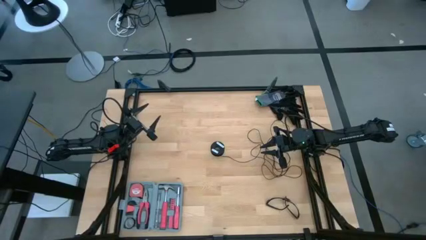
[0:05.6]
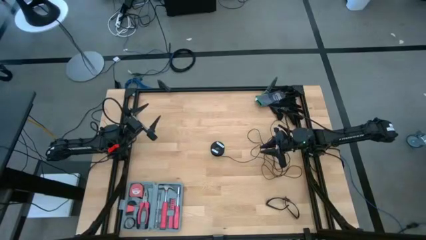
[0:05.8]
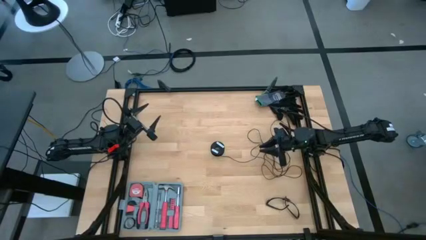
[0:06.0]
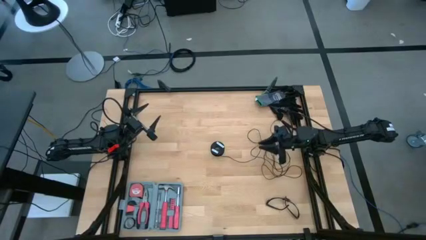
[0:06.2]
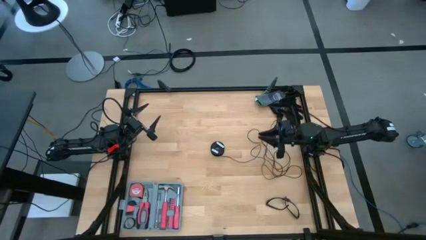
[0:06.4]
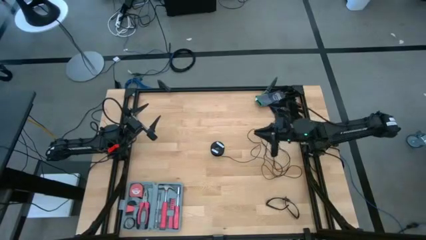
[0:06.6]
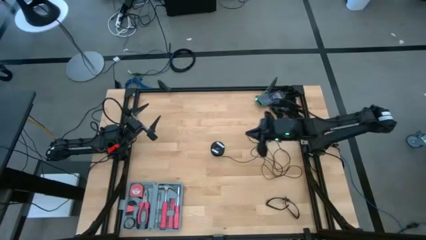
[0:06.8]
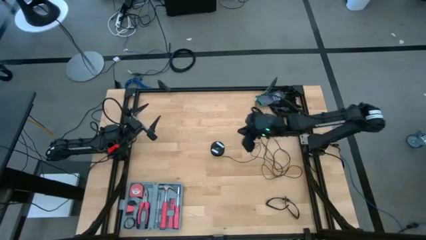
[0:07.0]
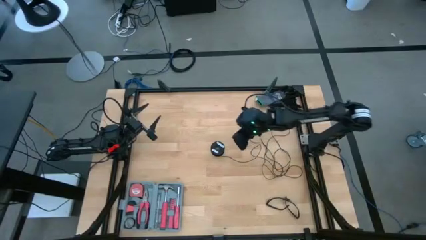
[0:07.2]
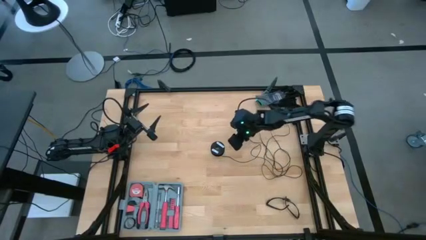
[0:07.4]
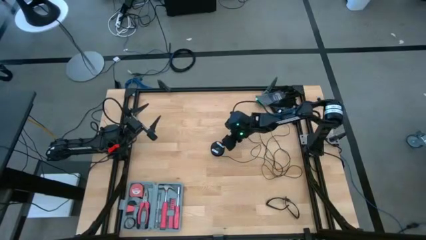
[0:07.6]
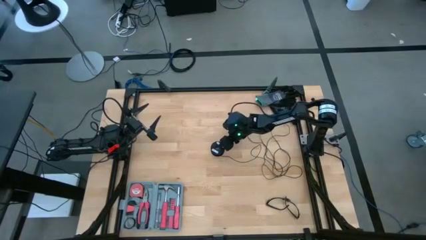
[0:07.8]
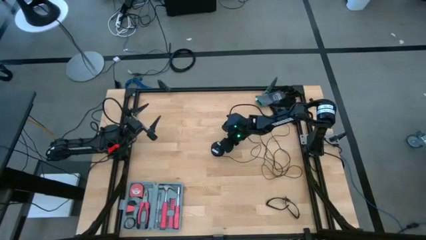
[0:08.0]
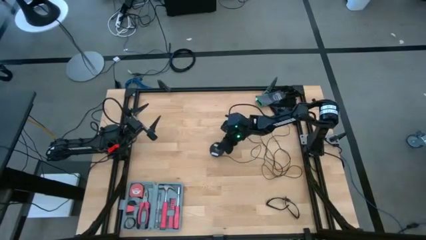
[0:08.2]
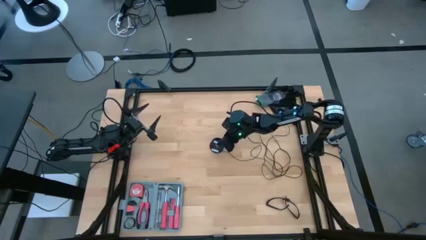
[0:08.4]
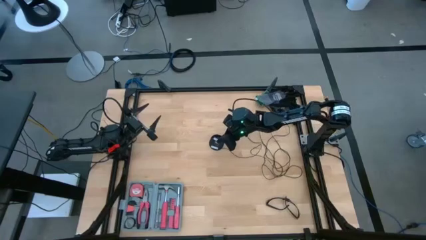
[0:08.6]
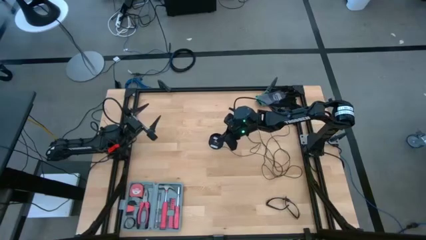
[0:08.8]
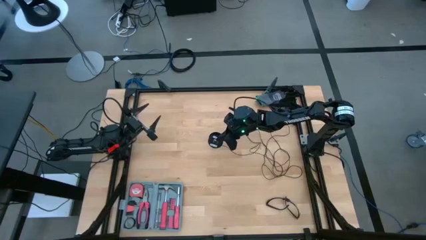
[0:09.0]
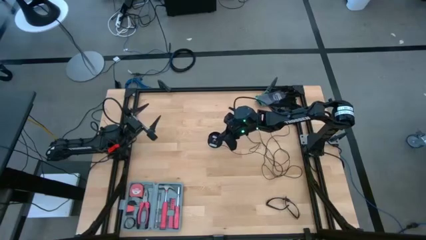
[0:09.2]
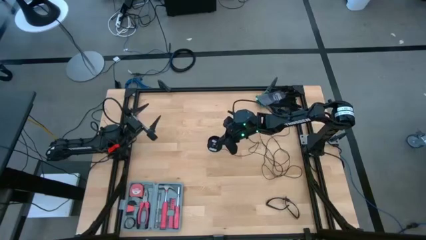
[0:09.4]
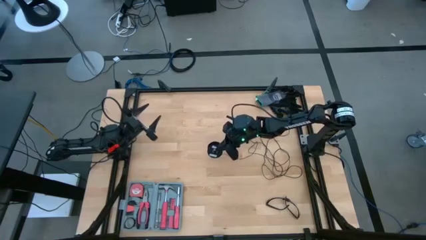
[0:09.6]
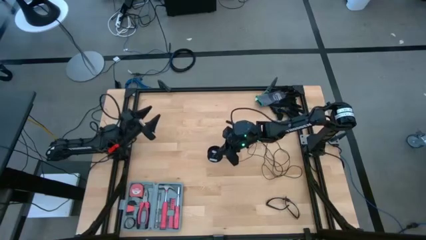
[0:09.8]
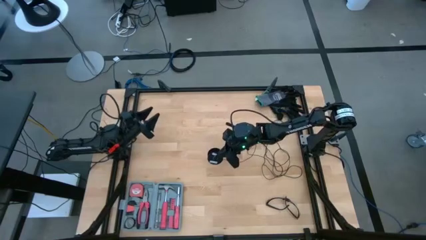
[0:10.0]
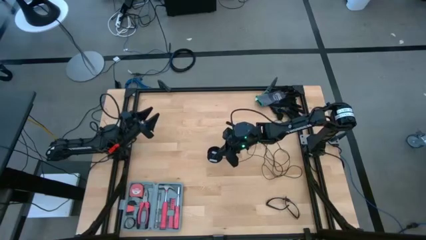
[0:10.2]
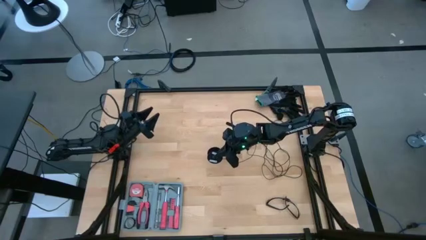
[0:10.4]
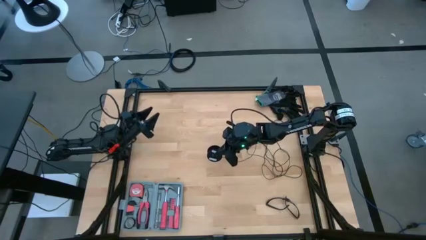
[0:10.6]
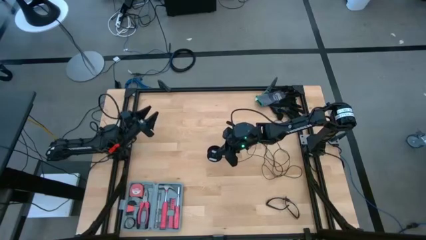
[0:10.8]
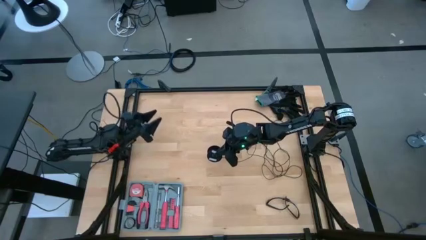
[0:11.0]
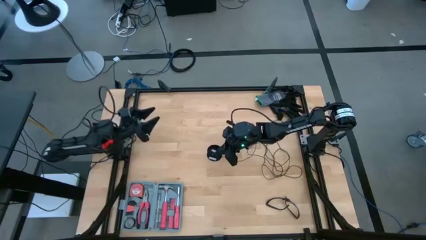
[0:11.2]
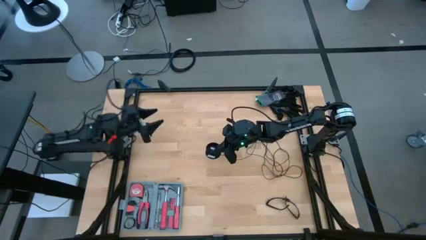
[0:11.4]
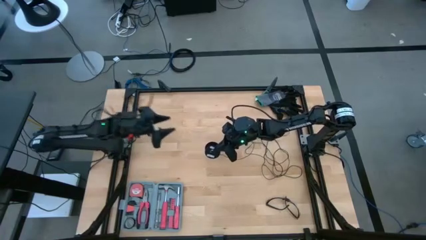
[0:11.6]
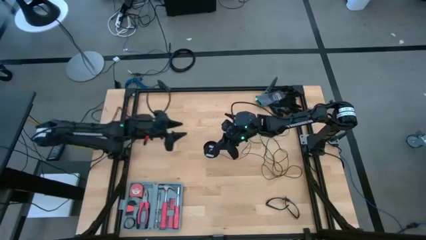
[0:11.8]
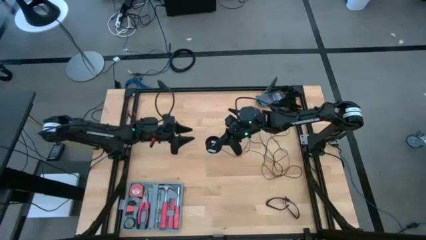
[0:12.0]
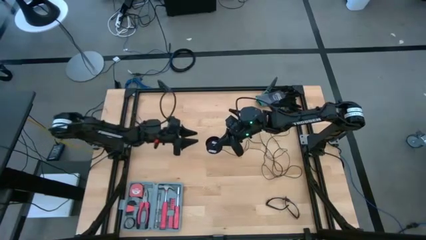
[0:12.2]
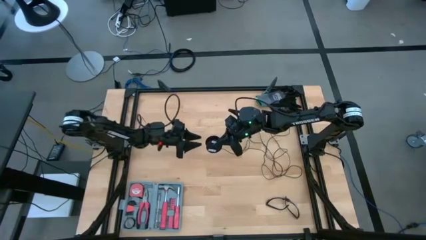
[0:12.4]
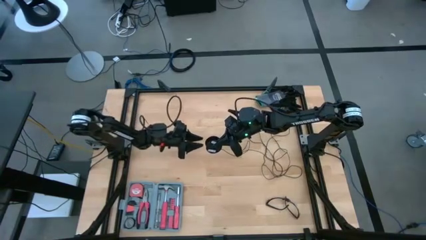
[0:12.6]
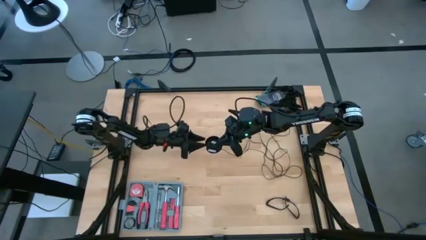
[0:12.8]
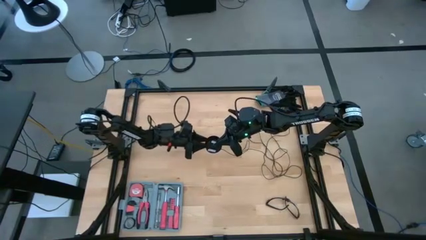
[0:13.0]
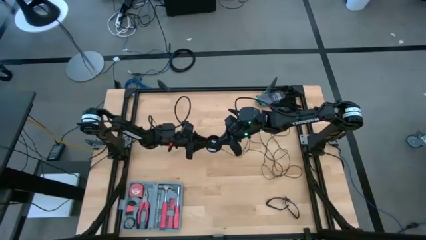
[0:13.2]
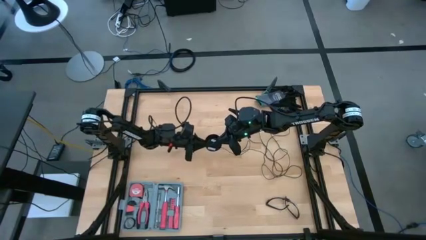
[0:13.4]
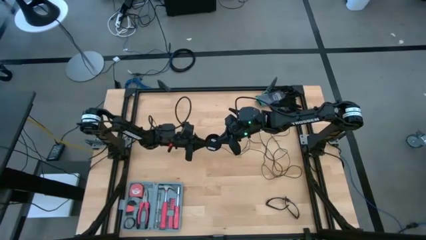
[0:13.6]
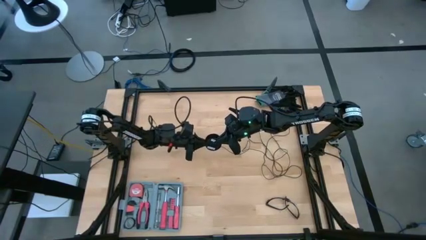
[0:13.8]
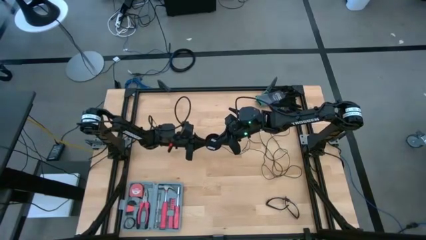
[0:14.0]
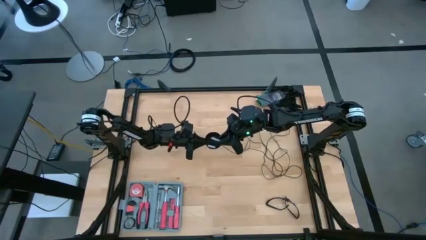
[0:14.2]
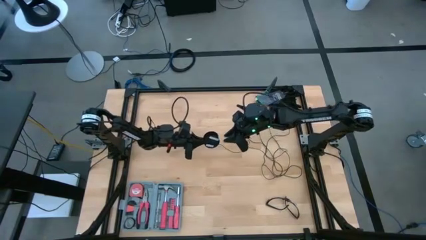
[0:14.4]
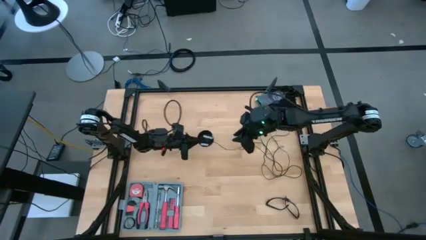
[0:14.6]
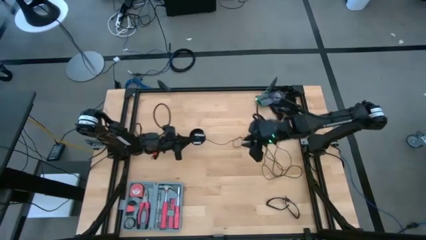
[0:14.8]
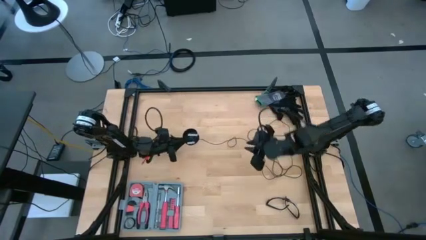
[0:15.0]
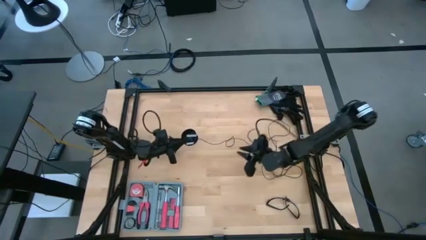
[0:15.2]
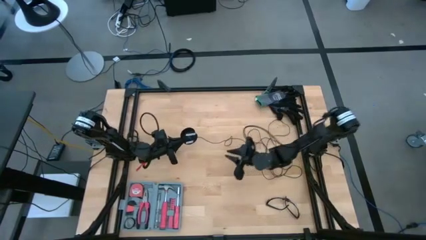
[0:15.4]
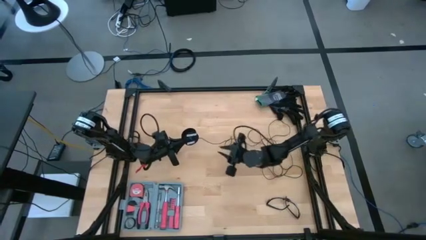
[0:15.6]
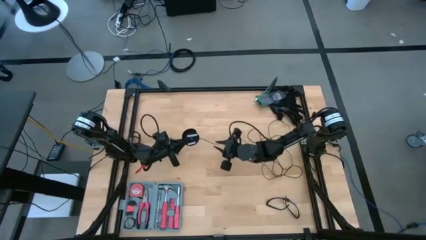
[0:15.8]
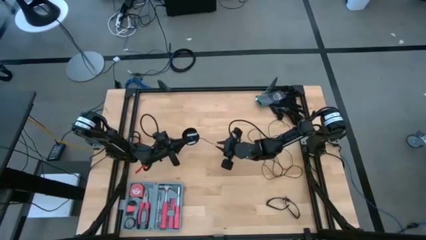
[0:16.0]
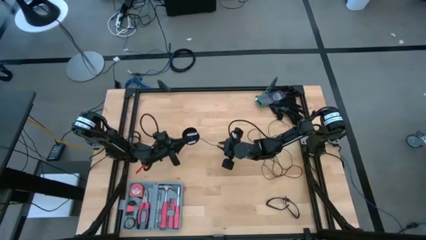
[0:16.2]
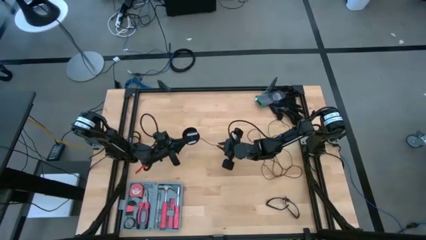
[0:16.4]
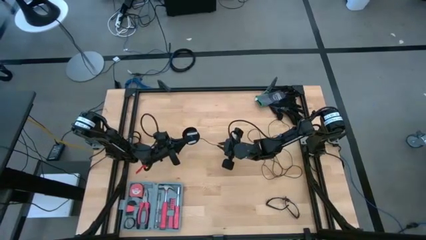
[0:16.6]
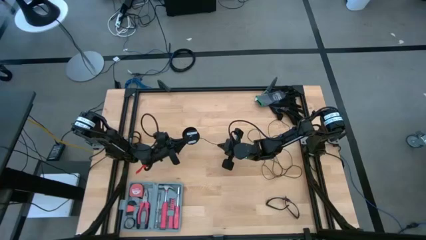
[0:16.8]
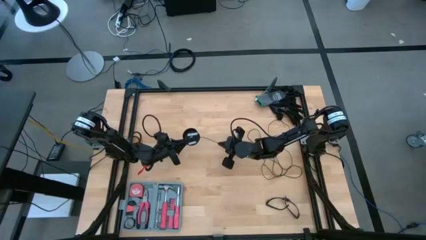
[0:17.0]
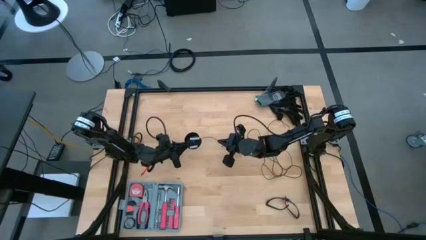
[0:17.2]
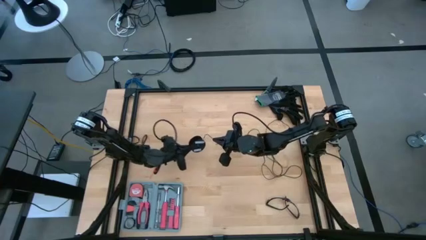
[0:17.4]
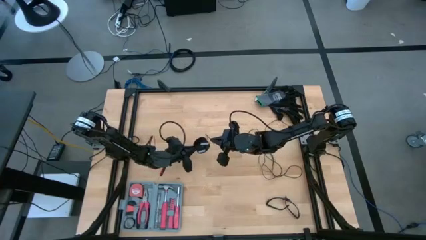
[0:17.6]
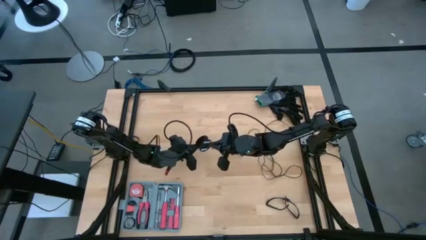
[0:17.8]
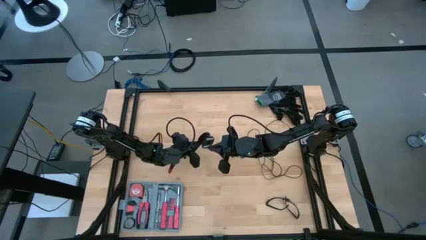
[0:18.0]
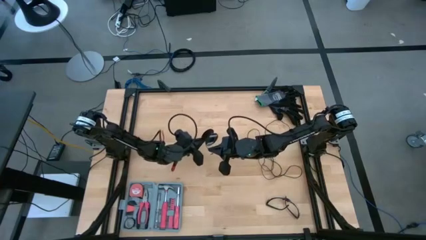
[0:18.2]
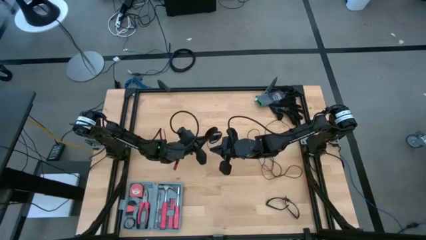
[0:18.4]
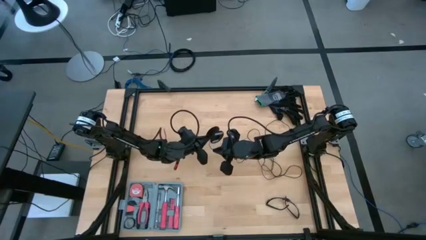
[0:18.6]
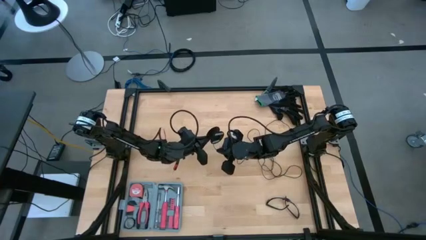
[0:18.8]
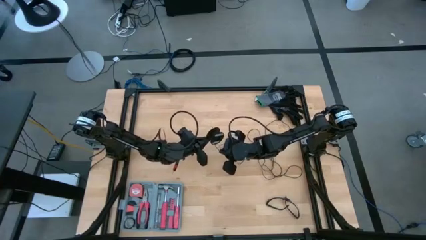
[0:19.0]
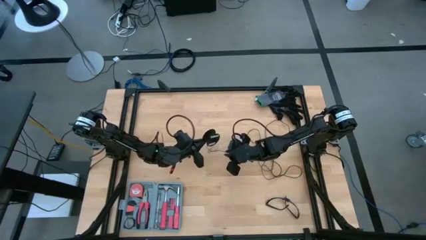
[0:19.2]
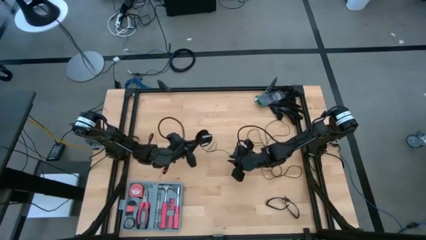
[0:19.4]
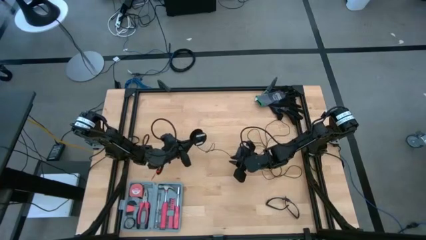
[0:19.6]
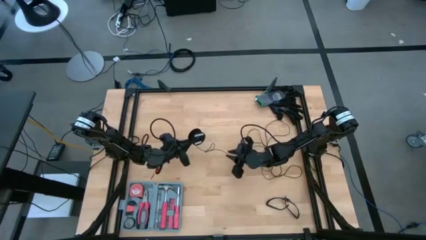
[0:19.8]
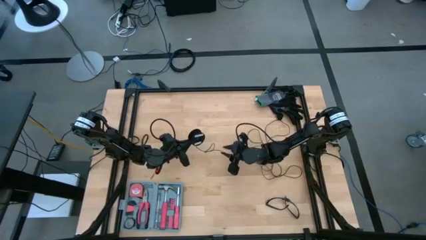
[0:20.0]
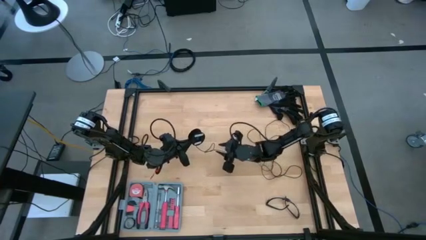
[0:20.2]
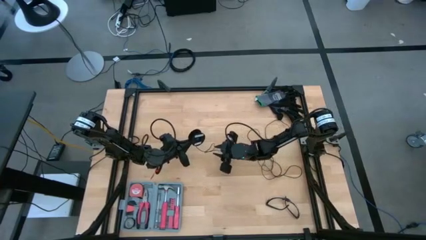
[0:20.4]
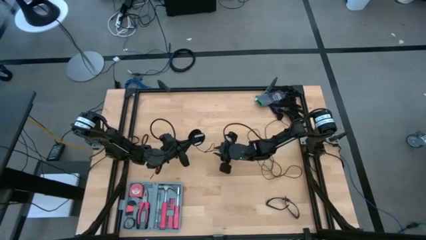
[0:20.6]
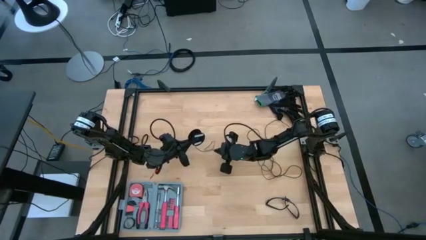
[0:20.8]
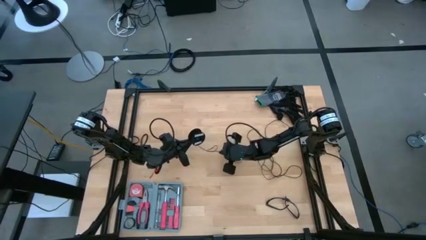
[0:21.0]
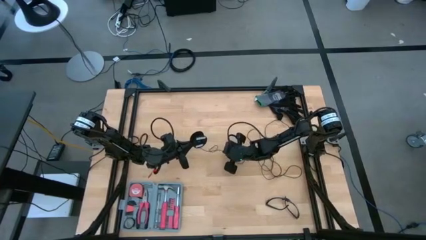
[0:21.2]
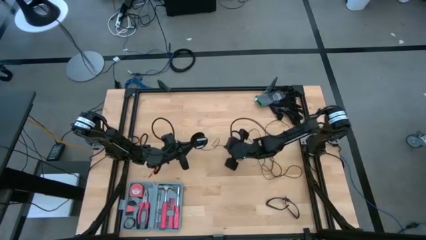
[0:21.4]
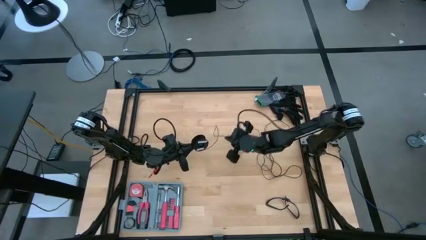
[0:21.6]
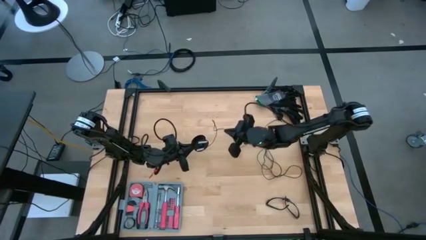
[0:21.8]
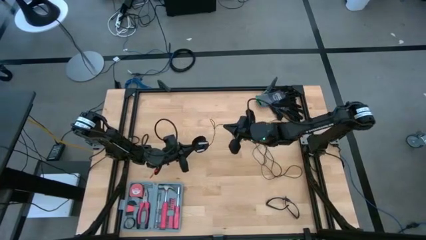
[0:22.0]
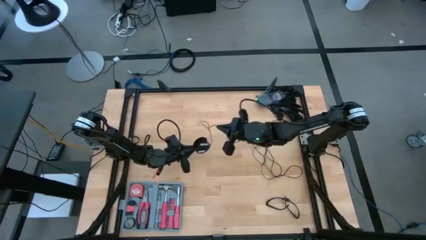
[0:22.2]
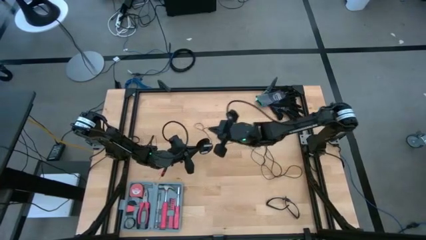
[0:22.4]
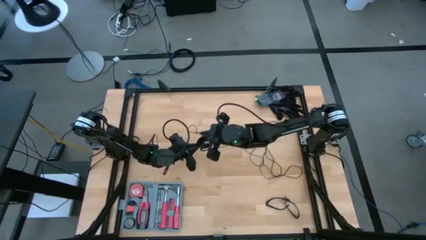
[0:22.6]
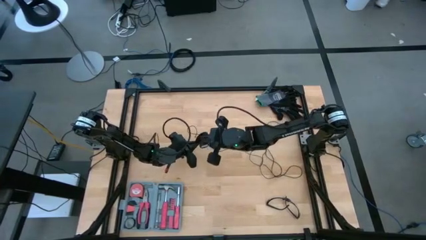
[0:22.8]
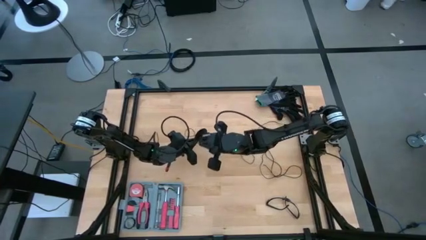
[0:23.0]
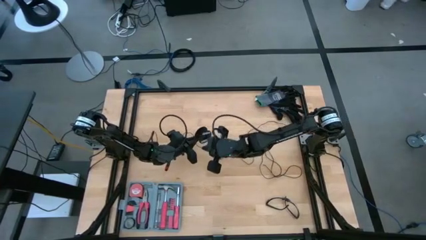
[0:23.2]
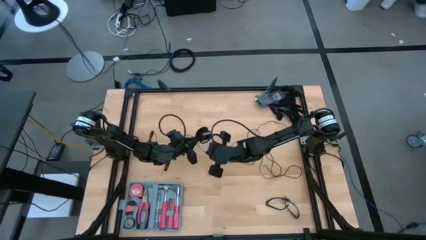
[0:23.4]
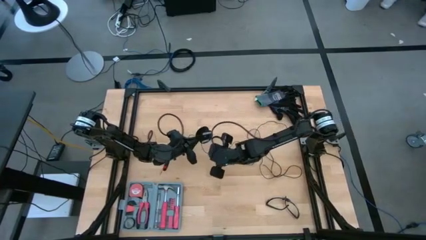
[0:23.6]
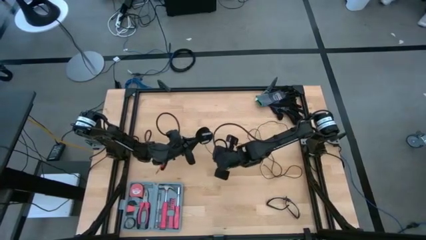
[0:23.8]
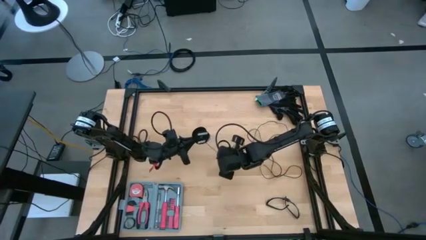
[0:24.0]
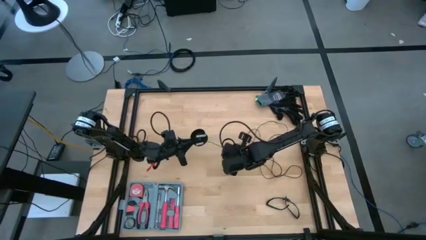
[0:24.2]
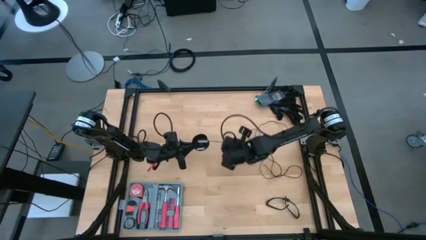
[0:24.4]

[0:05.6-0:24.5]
Task: Coil cords
Coil the black wire onto the spool
